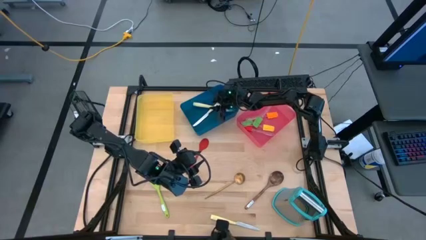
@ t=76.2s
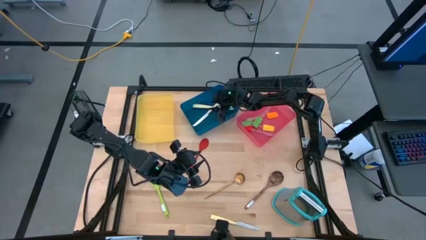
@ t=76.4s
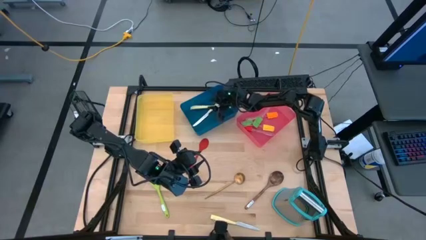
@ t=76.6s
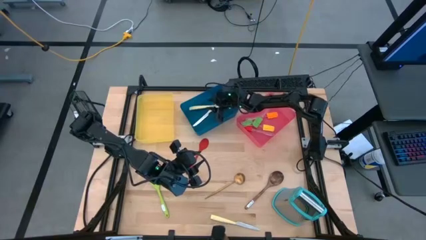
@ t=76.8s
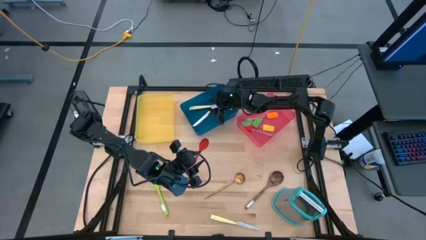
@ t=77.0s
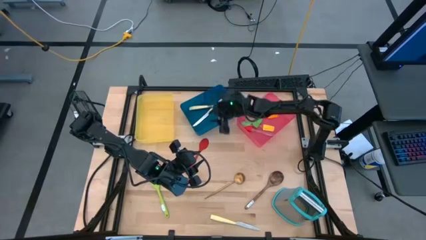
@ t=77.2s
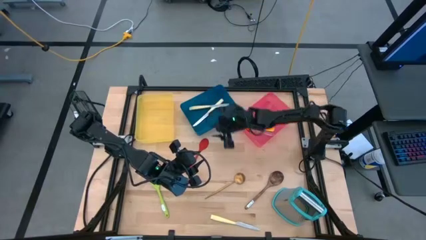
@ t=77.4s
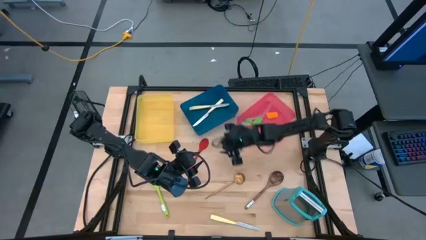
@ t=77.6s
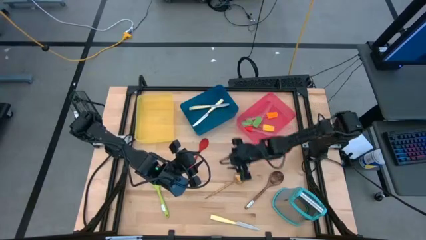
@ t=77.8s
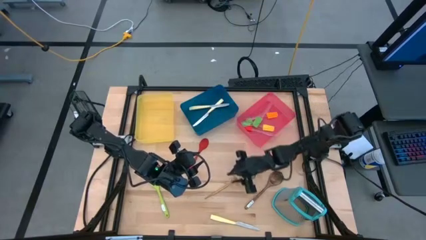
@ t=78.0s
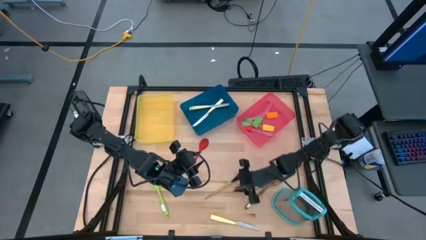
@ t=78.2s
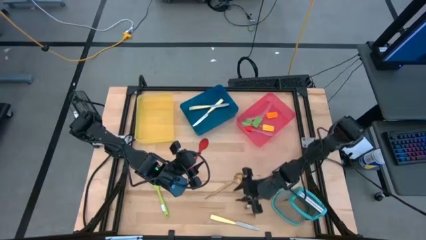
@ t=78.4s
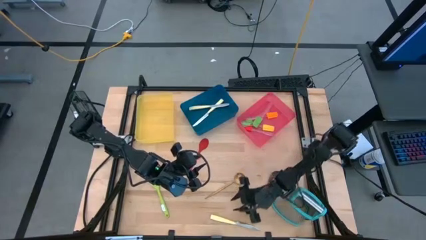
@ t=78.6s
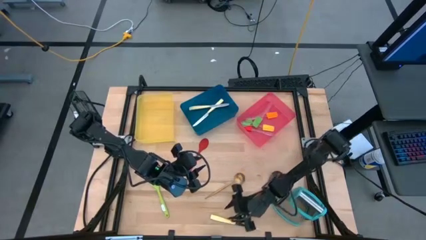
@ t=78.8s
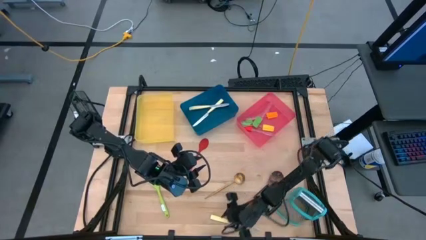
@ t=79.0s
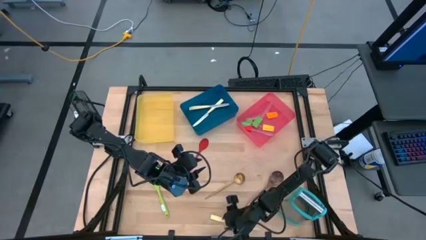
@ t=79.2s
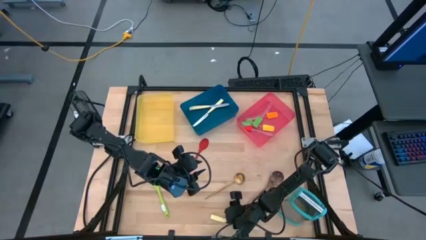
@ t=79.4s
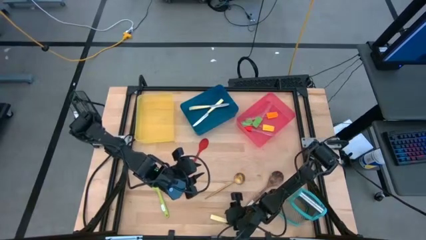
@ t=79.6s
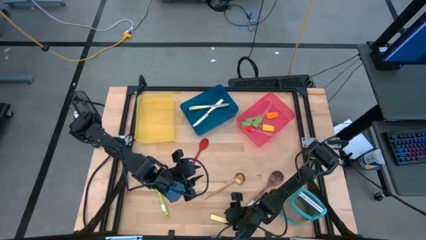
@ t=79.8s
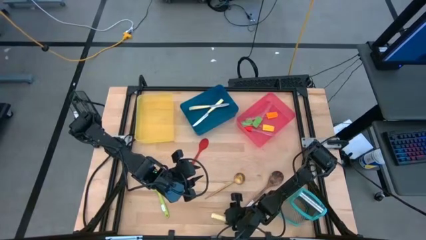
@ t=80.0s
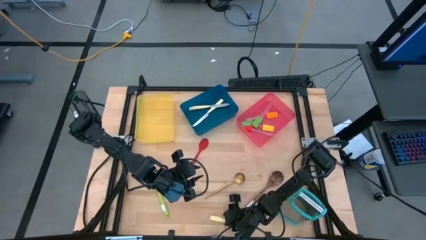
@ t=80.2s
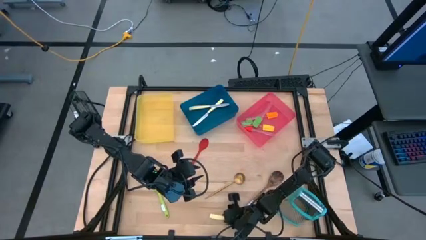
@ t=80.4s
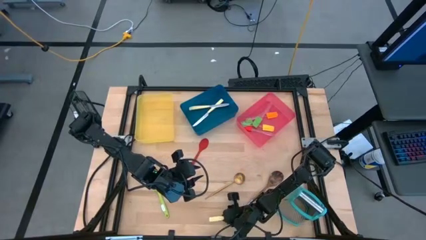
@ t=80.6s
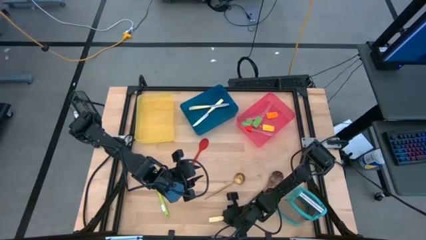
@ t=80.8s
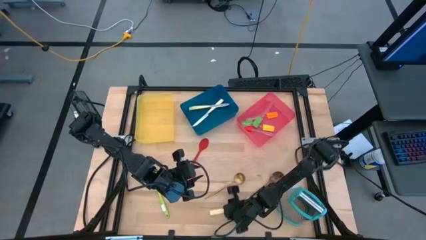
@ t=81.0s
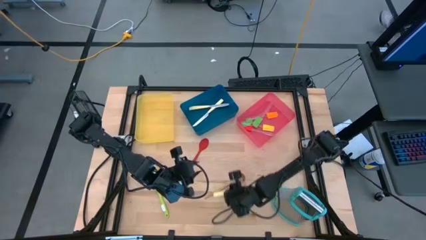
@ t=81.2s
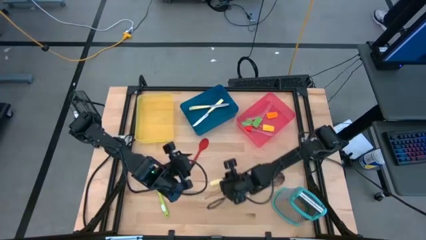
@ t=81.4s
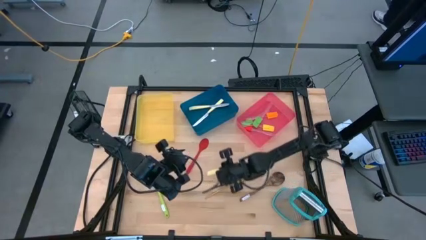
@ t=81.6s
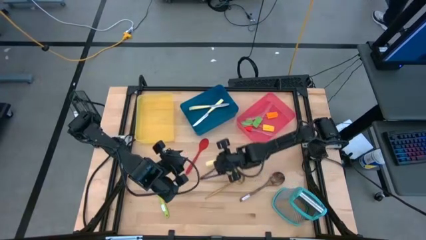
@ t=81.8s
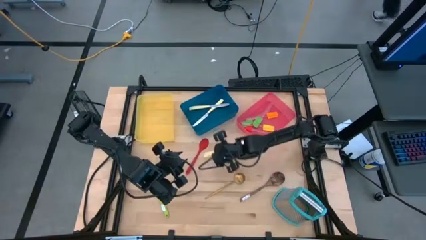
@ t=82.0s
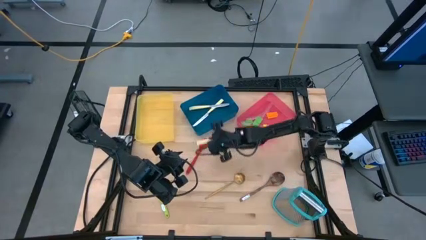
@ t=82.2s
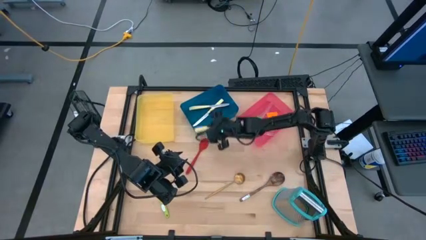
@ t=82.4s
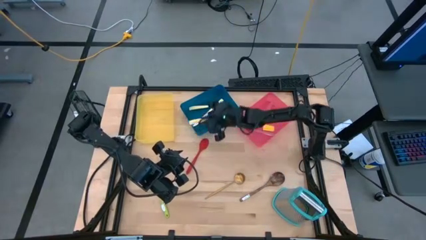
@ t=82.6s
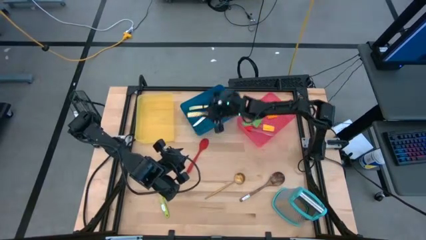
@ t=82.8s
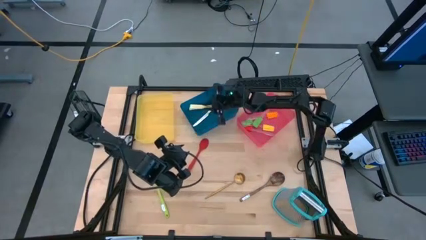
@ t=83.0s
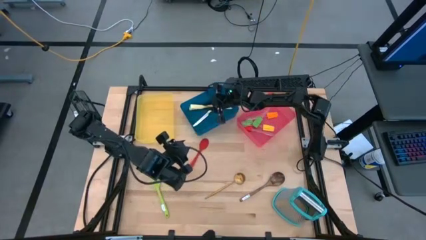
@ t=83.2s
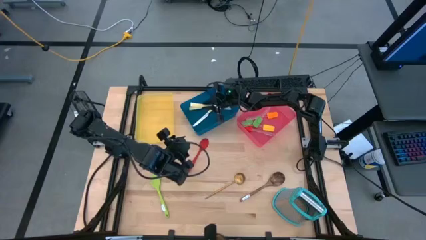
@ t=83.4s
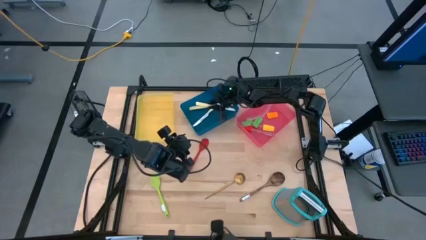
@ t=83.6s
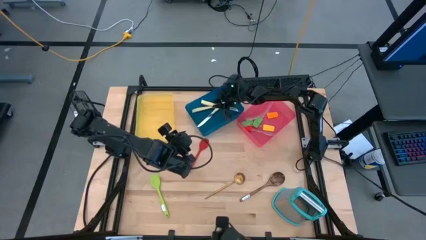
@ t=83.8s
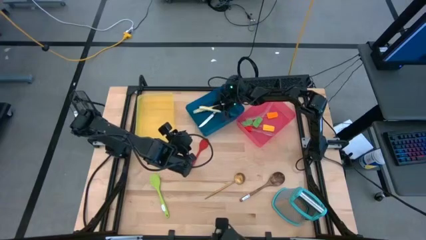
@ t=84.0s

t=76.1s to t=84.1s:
Task: Pick & Place Kitchen Items
Put the yellow knife into the blue bin

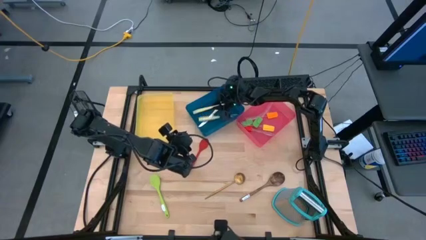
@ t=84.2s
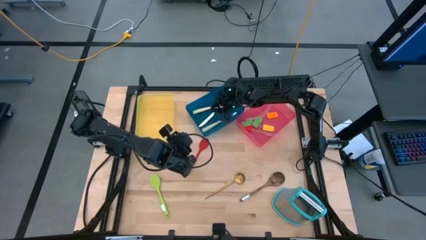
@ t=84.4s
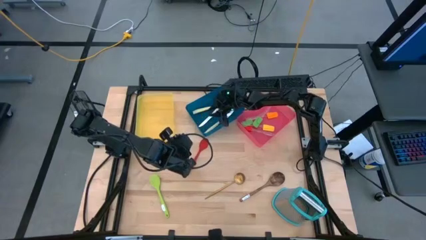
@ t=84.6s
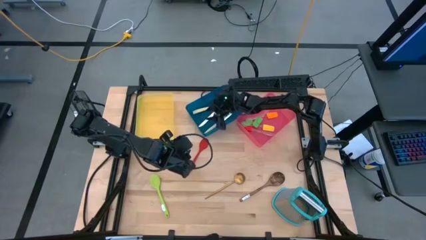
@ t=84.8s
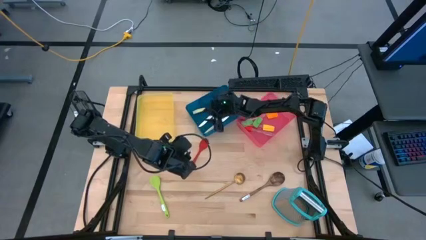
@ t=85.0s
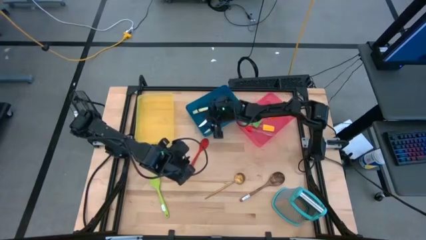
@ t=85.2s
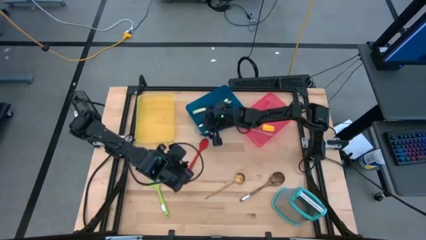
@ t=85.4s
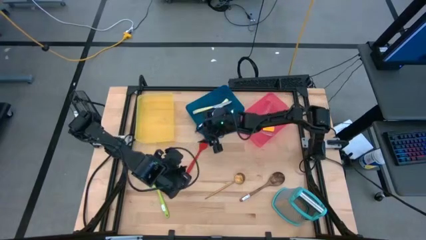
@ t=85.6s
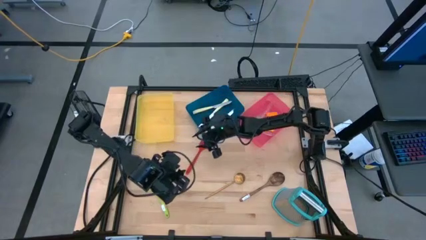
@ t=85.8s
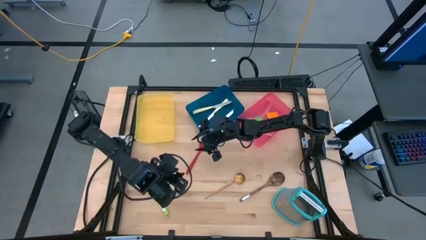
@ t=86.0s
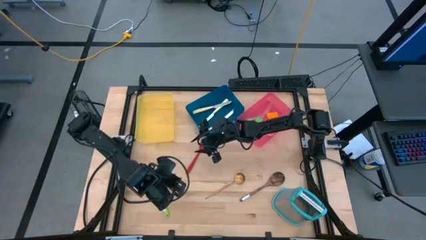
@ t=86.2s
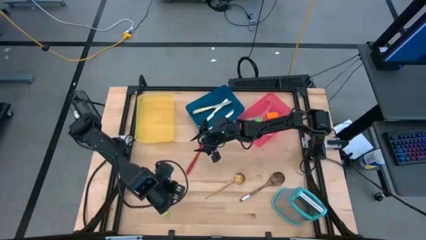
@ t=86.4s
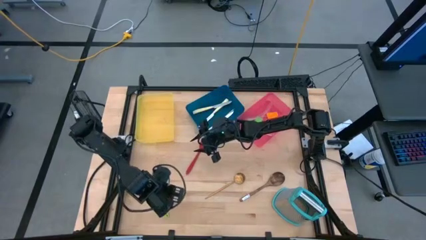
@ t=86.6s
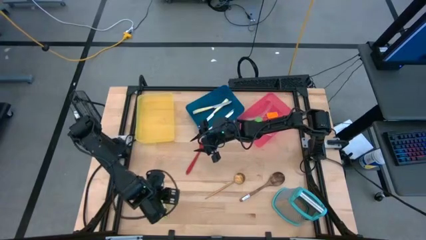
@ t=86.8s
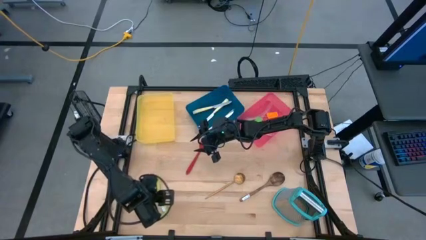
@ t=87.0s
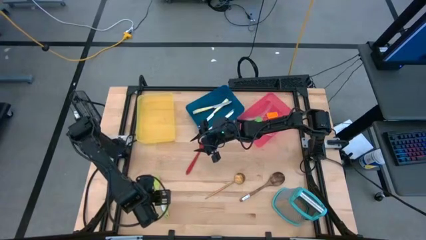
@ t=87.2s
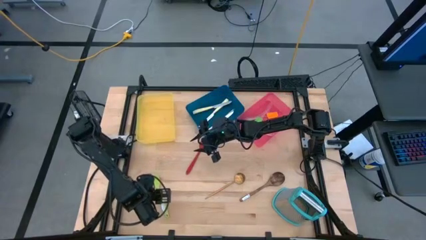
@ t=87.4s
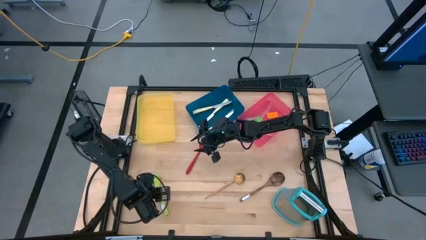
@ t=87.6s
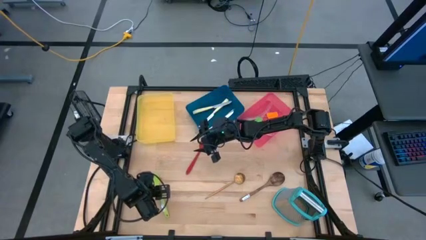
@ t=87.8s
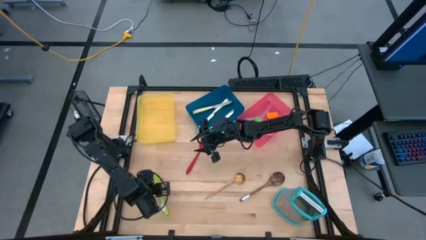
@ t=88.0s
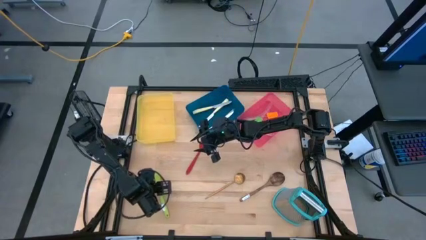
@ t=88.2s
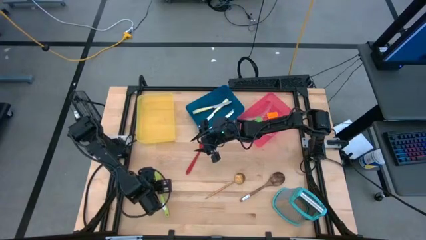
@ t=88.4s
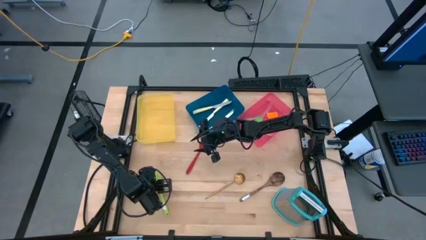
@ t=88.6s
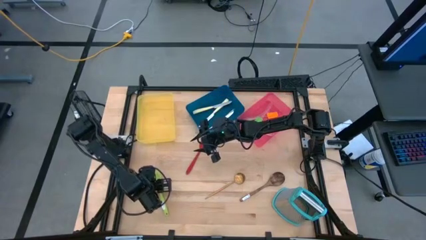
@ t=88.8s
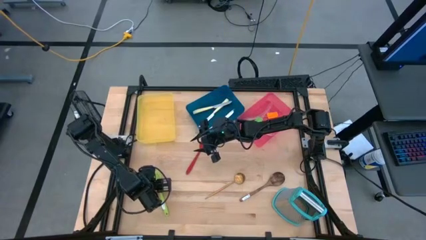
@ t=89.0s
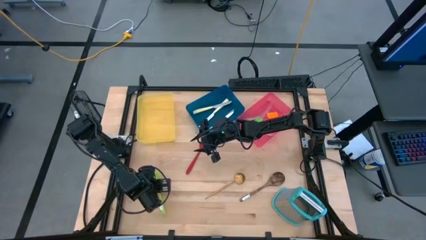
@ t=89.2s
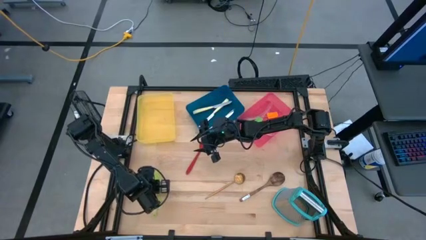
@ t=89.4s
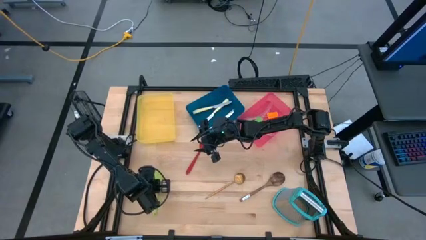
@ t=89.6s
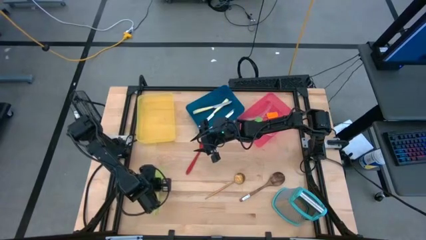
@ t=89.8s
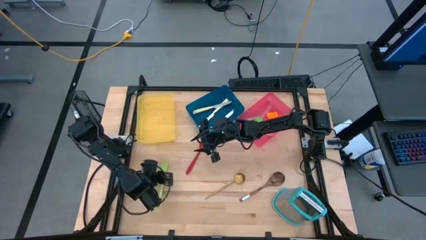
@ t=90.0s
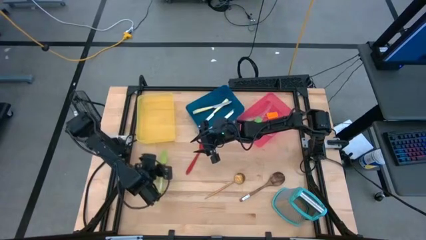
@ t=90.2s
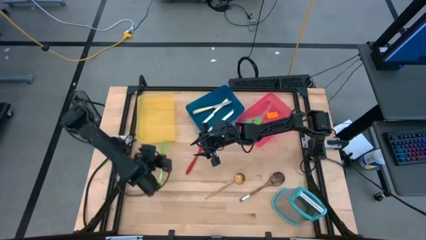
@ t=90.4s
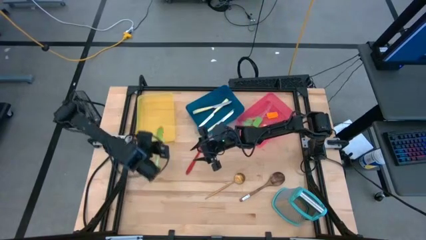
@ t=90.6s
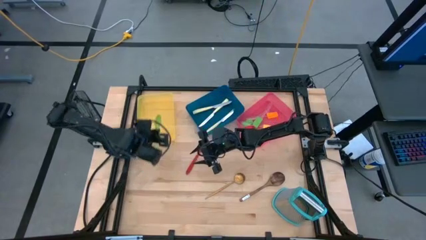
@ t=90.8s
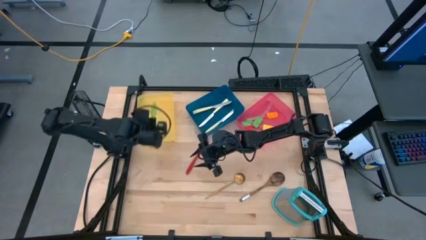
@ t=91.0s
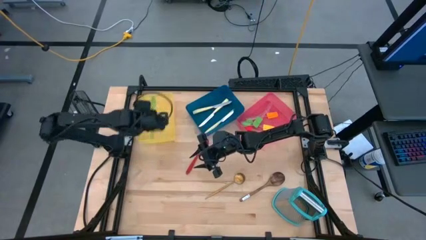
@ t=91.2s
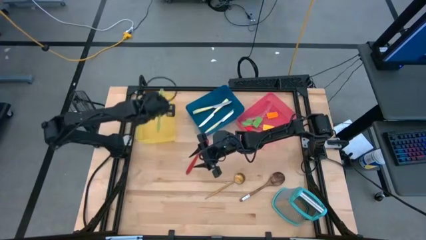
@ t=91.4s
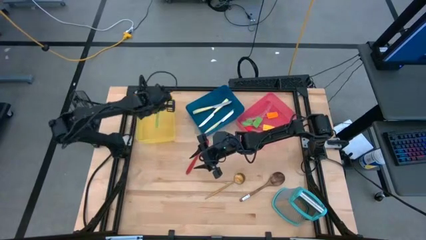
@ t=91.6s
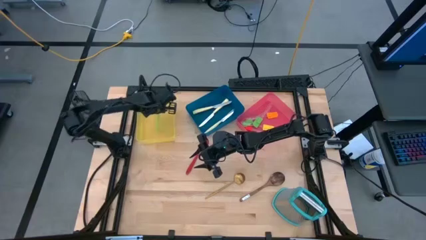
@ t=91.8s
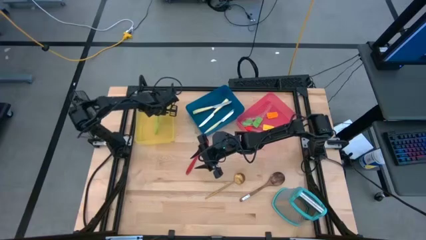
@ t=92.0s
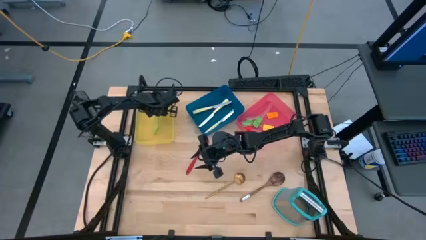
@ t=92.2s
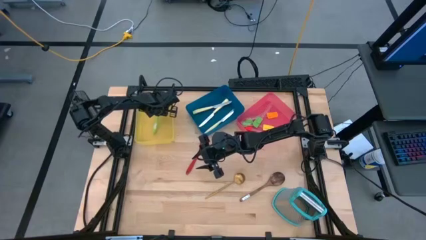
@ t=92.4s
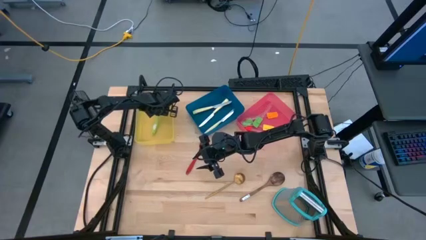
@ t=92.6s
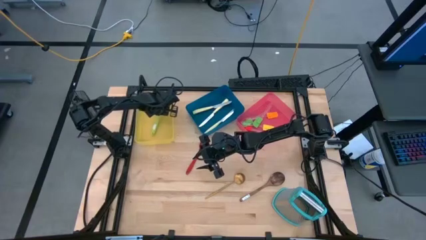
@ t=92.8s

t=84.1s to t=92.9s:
Put the green spoon into the yellow bin
